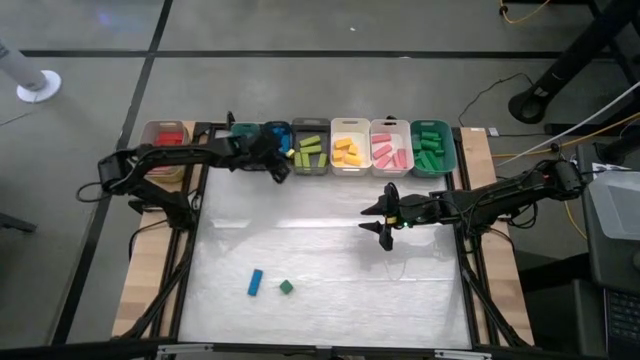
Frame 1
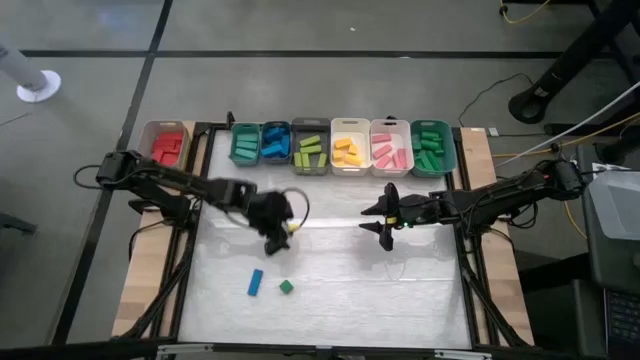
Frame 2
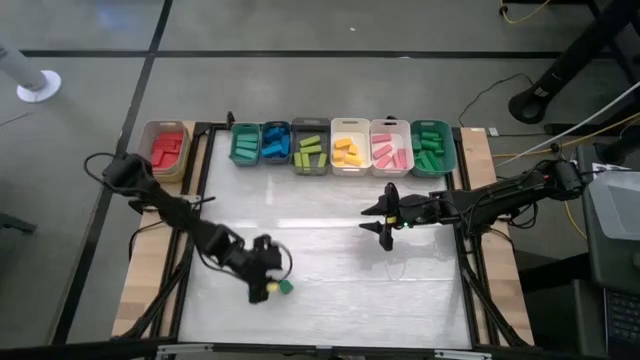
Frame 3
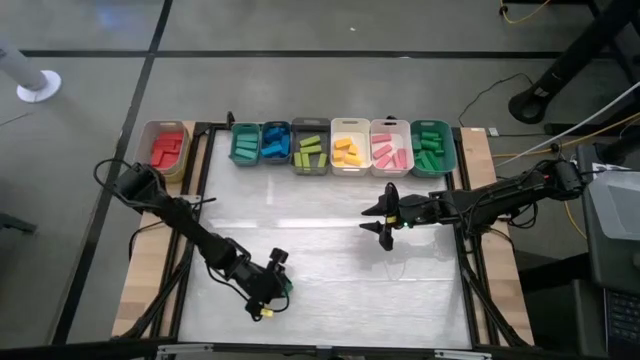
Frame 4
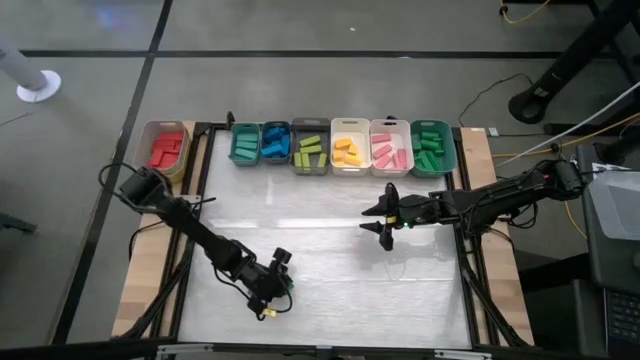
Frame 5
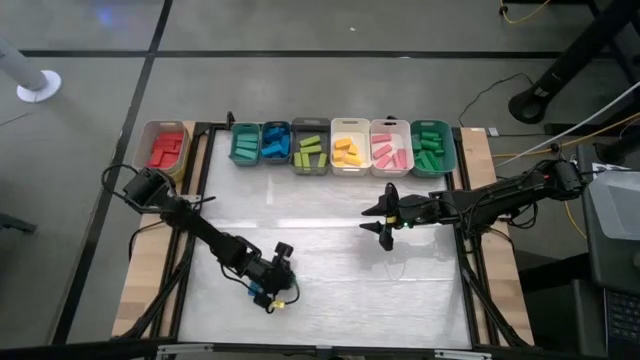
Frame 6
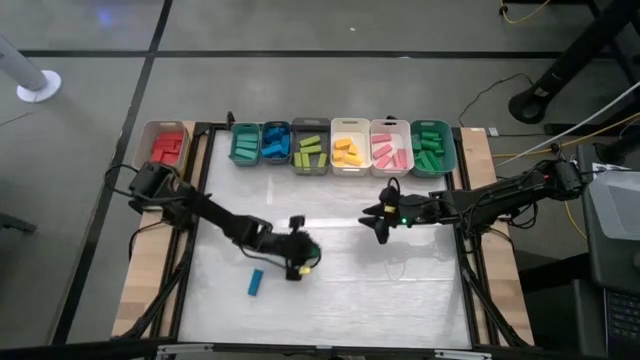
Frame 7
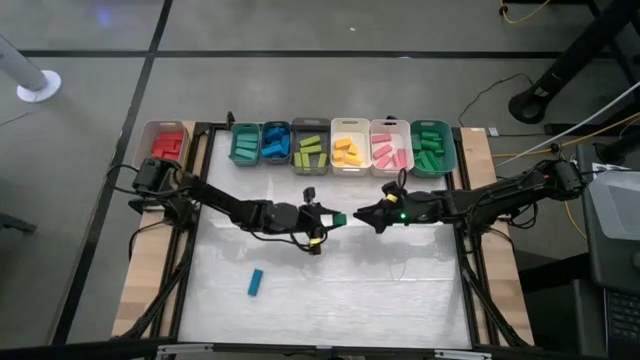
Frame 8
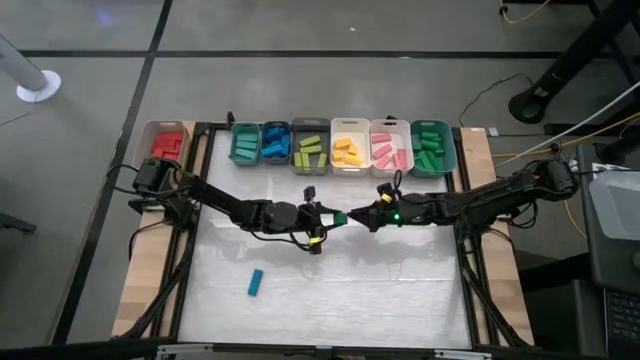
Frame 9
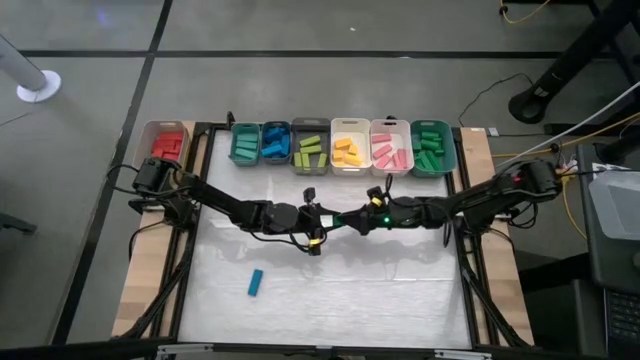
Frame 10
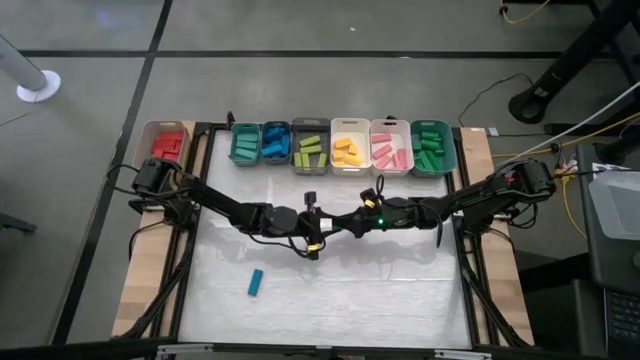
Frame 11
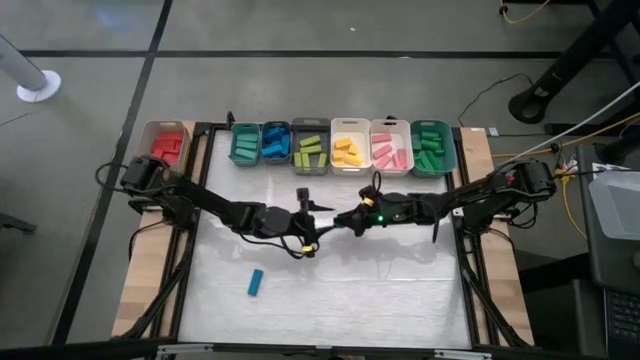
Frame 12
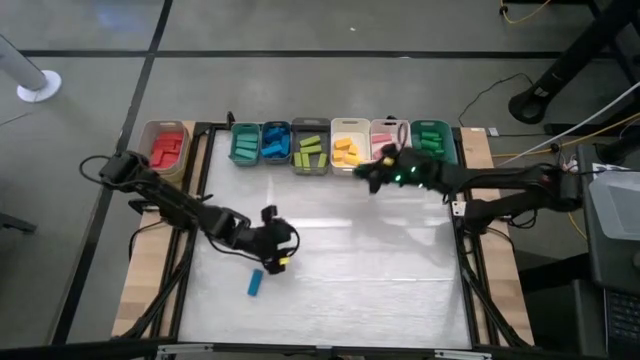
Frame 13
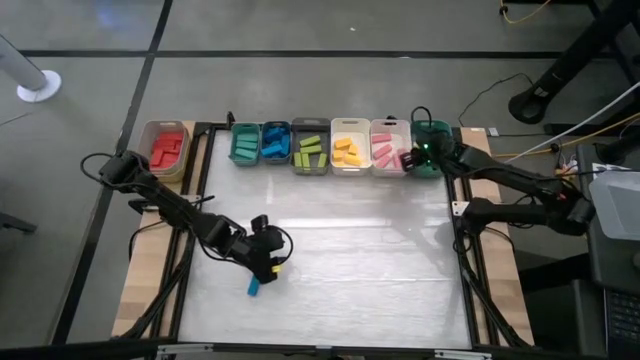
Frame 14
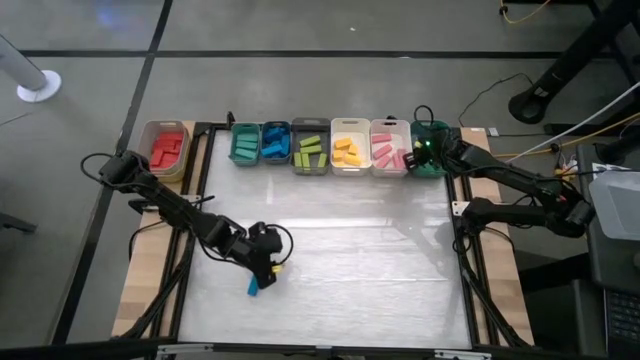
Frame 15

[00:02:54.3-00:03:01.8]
Task: Sort blocks
Put the green block into the right green bin

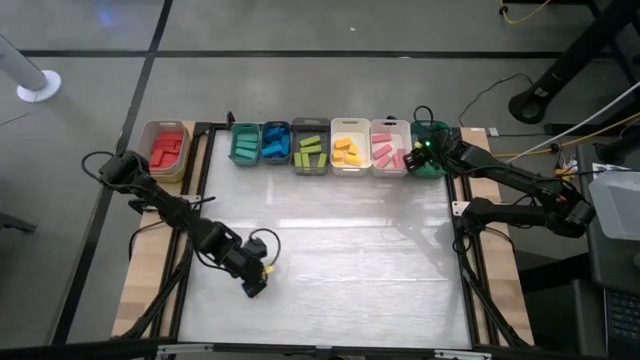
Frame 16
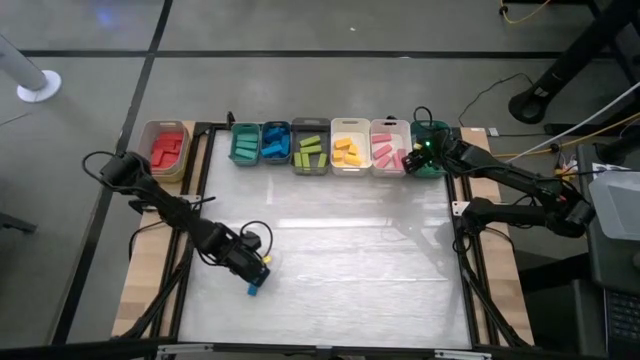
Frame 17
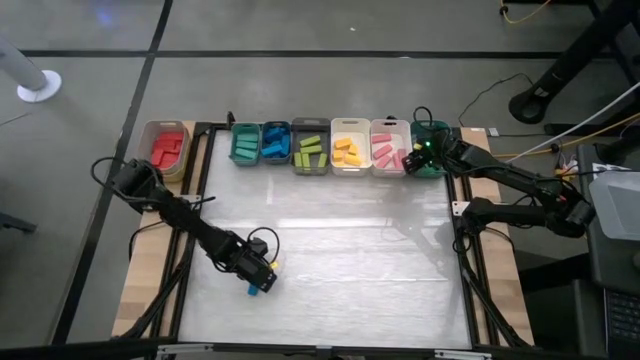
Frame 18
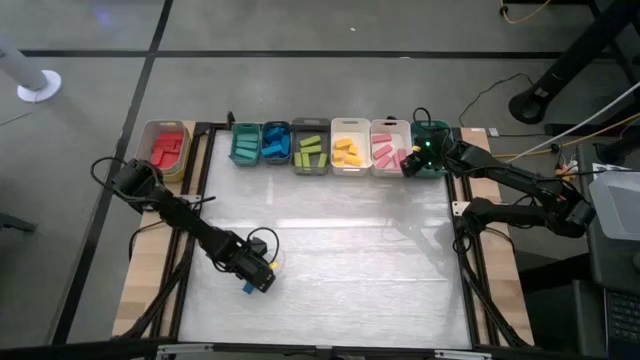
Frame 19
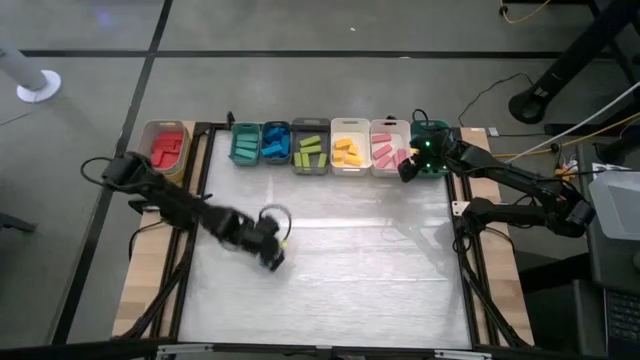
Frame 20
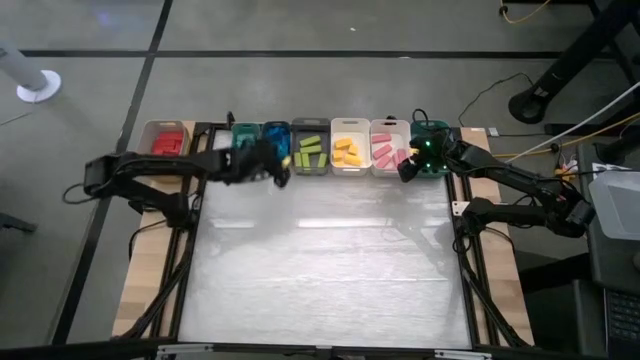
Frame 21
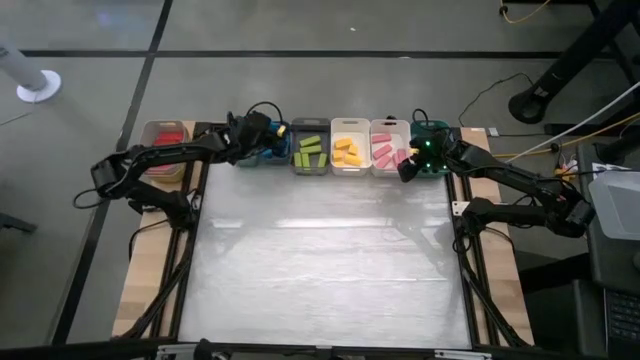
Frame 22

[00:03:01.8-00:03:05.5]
Put the blue block into the blue bin

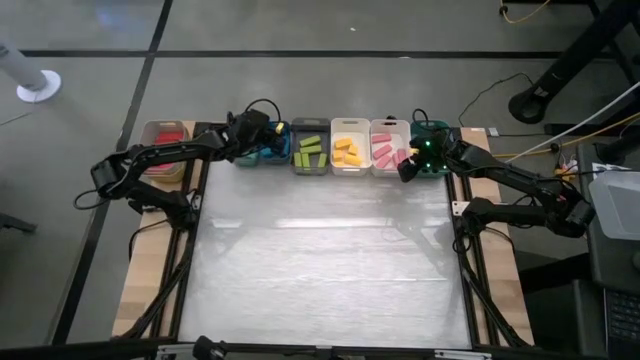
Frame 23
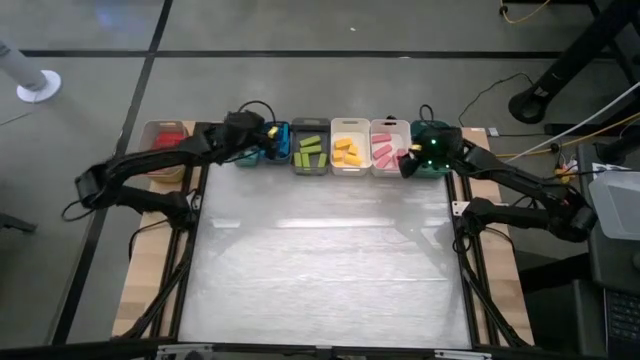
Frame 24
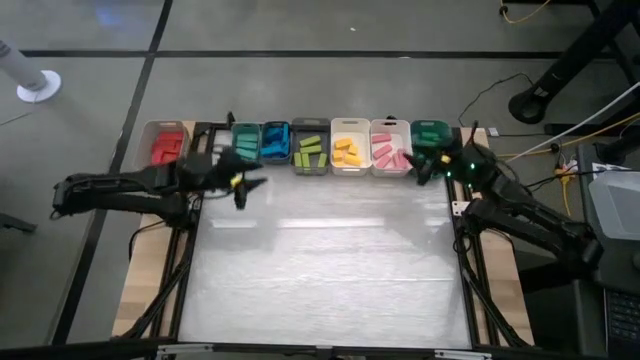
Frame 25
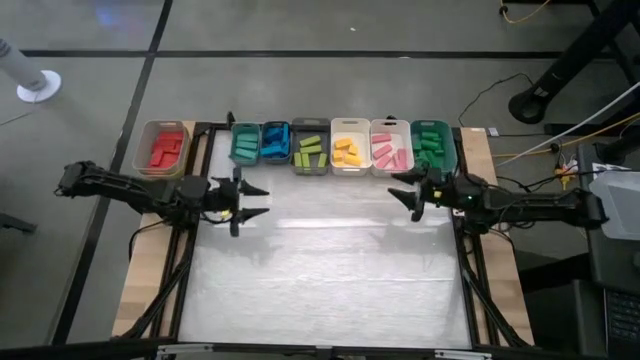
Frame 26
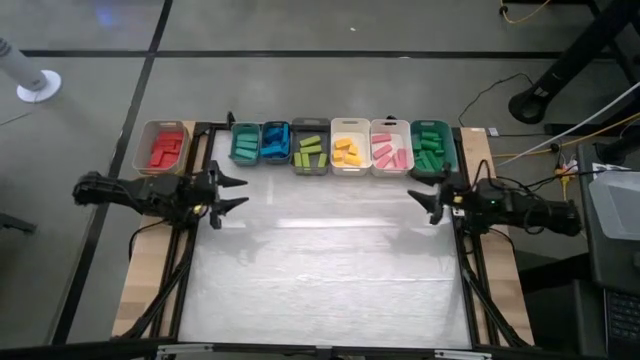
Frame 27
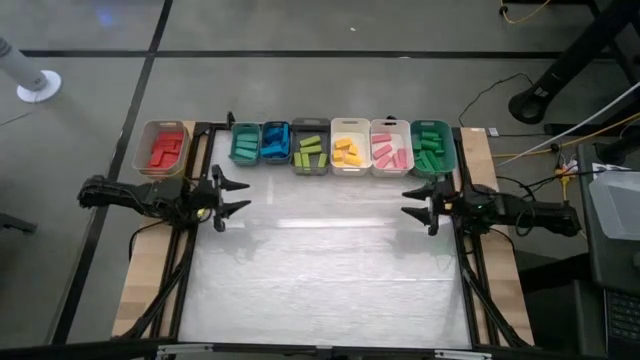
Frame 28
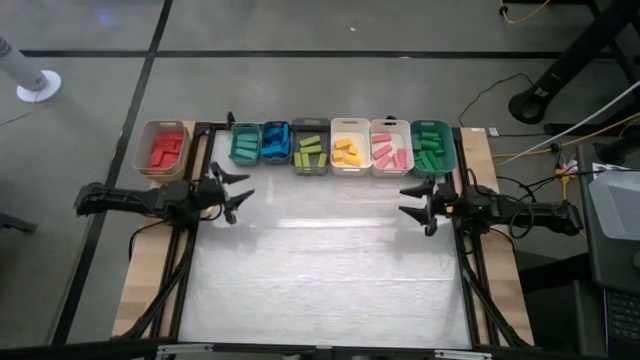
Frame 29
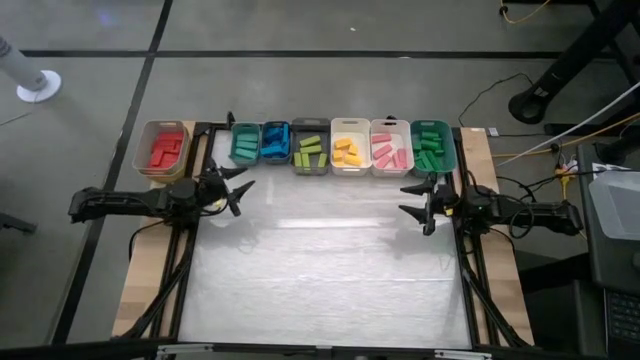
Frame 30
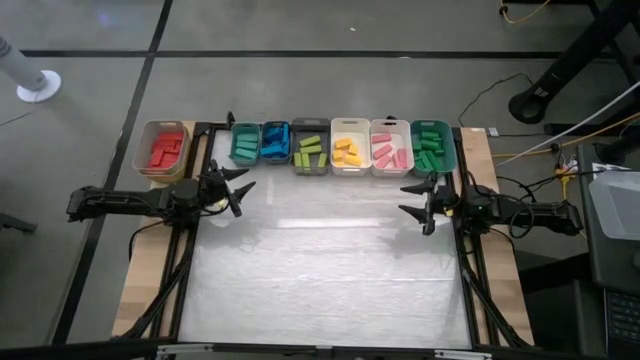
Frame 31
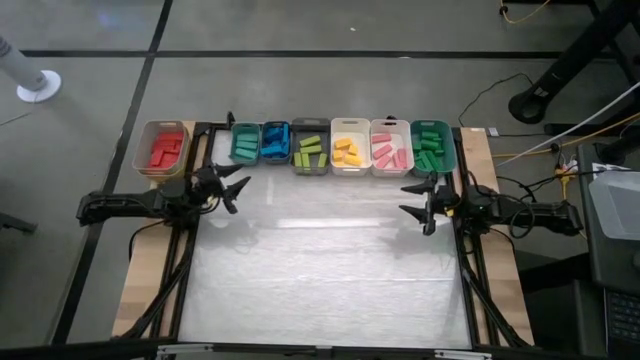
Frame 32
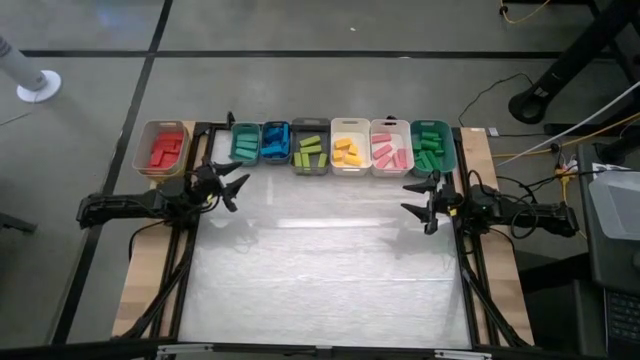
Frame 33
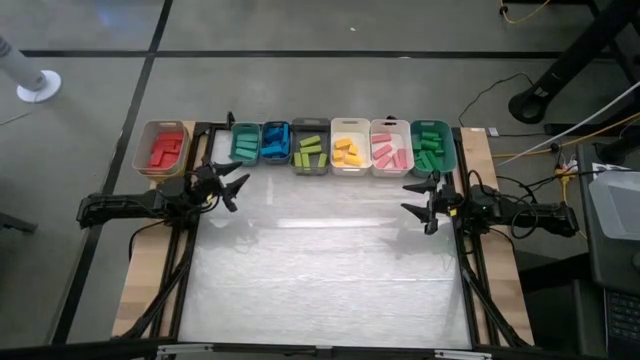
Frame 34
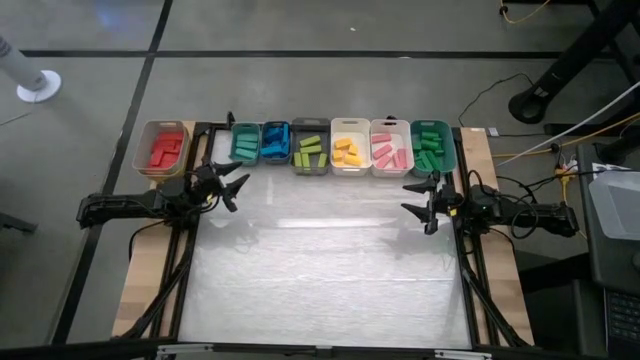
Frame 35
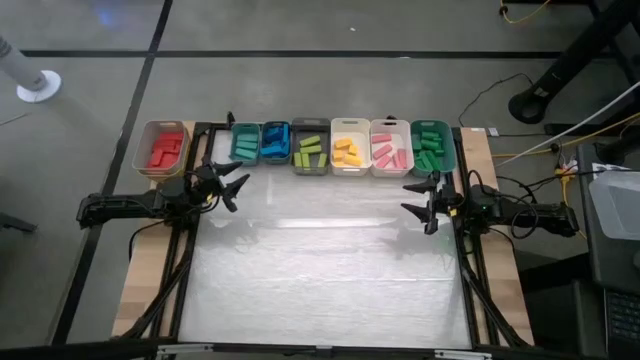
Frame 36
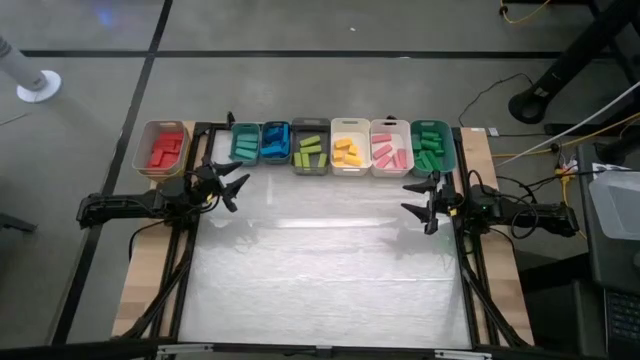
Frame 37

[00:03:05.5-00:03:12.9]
Return to Home Position

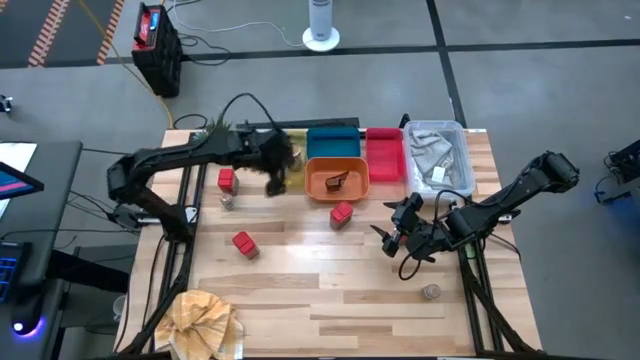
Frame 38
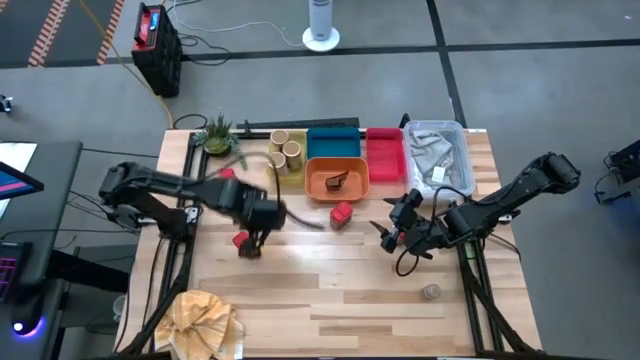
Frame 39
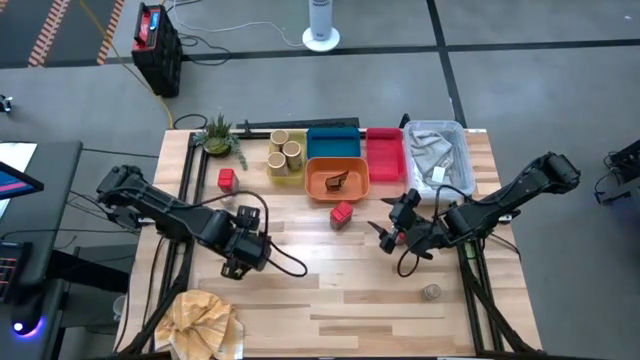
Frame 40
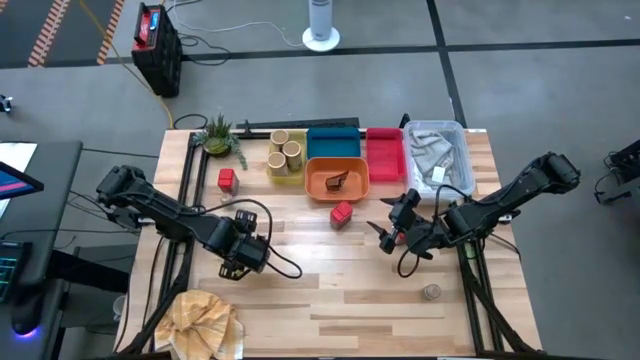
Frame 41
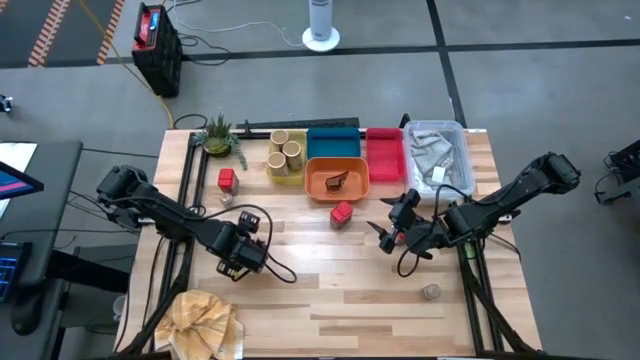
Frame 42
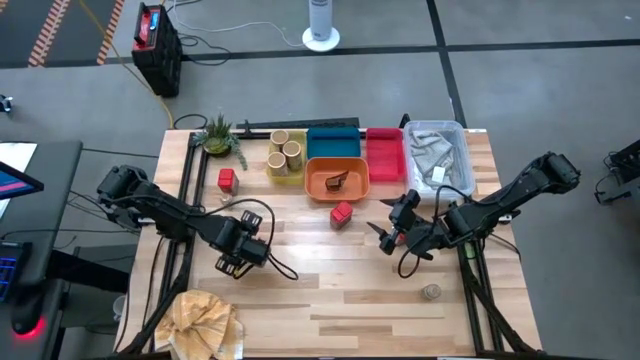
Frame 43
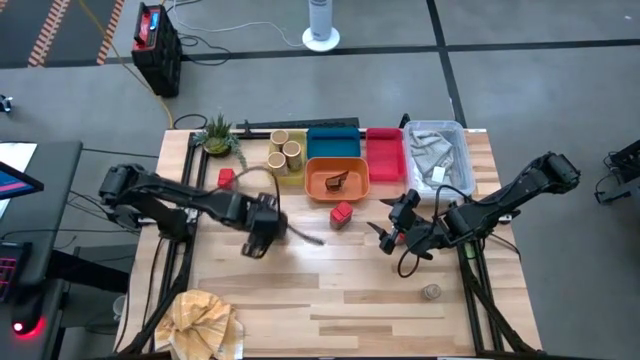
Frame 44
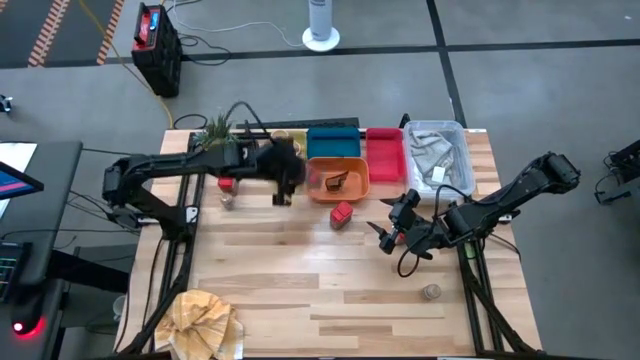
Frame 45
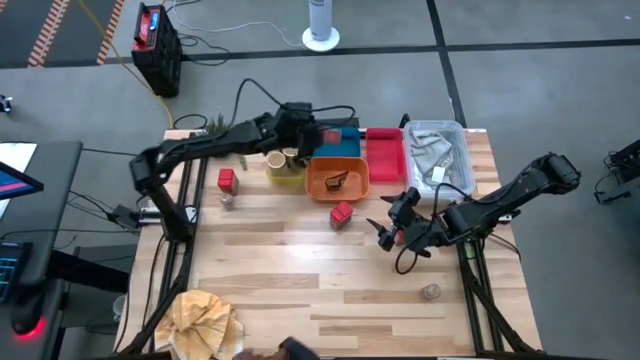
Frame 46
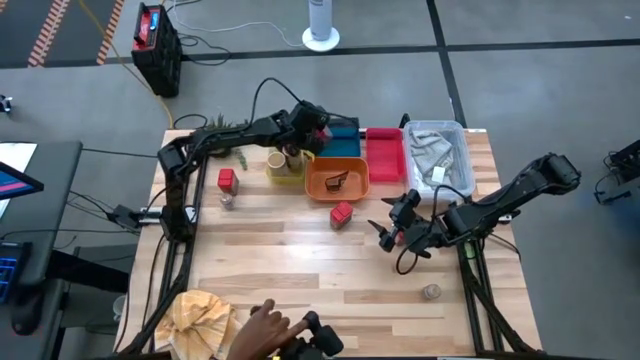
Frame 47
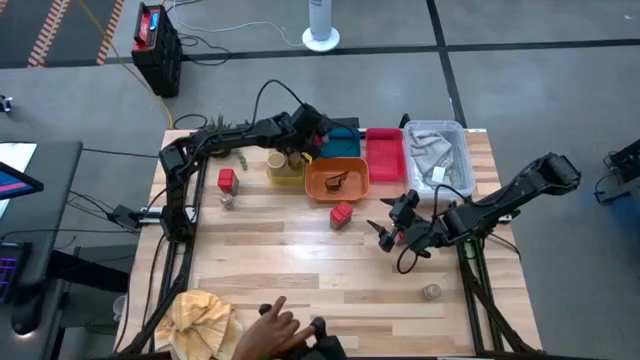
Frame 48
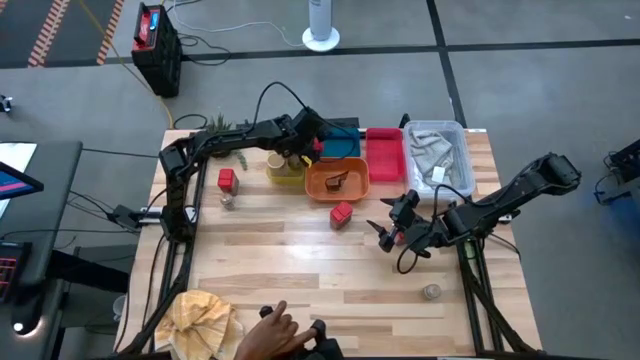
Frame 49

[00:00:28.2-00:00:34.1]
Task: Sort spices by type
Put the middle left red seasoning can into the blue bin
